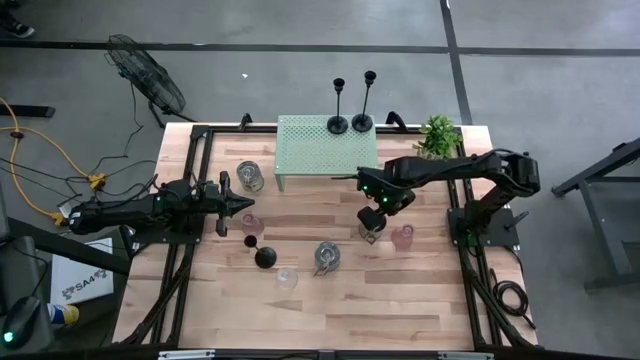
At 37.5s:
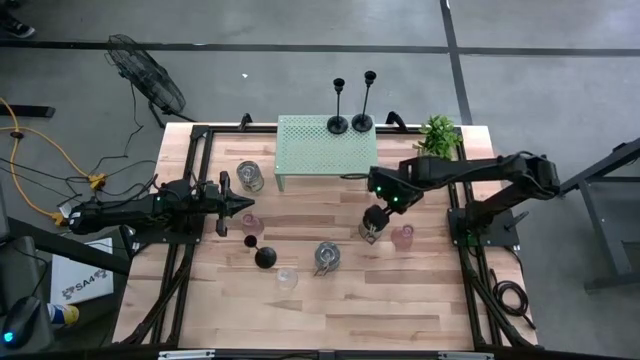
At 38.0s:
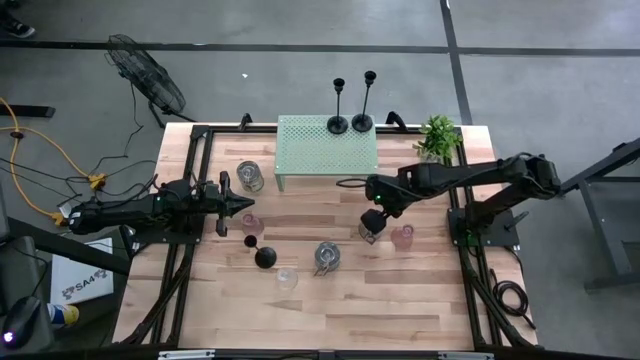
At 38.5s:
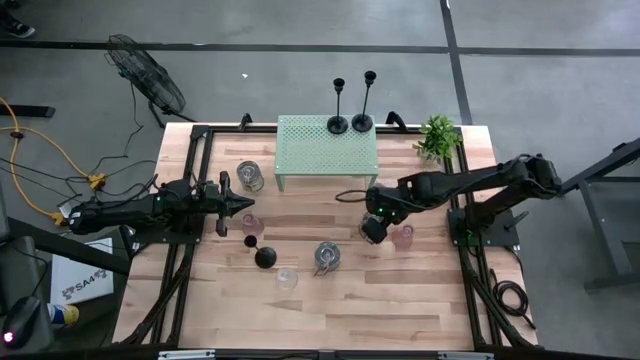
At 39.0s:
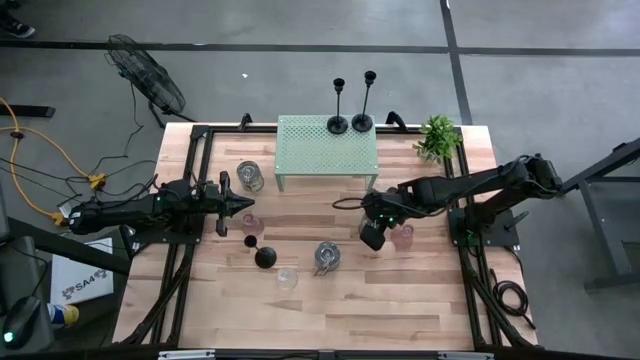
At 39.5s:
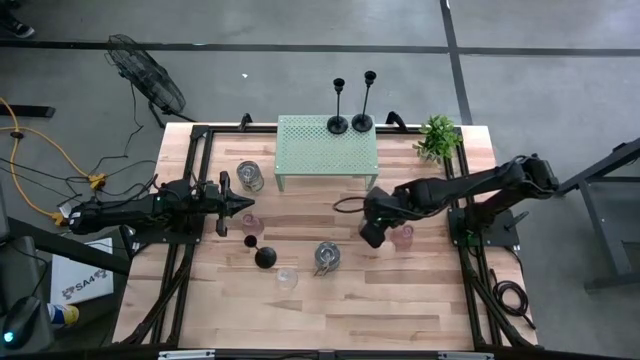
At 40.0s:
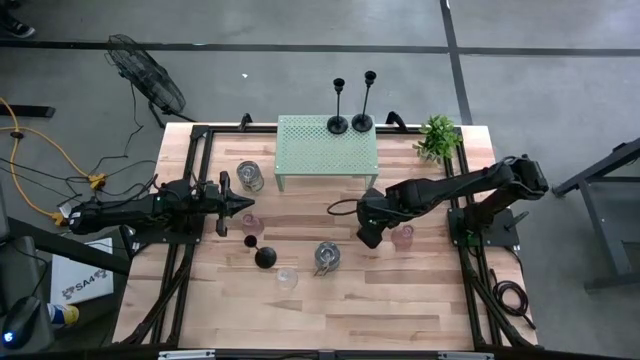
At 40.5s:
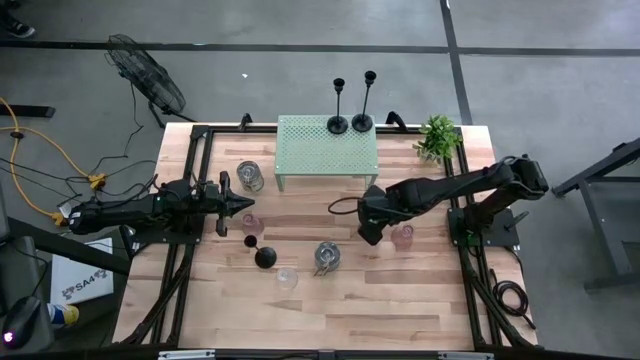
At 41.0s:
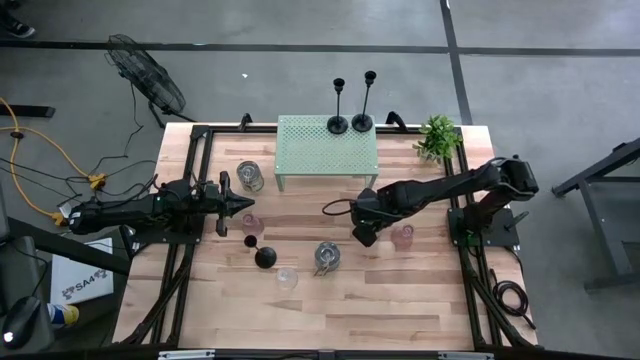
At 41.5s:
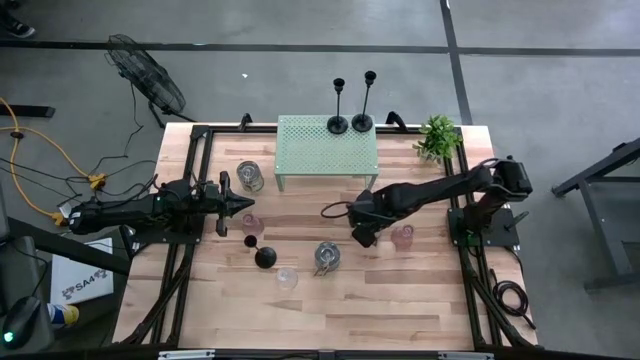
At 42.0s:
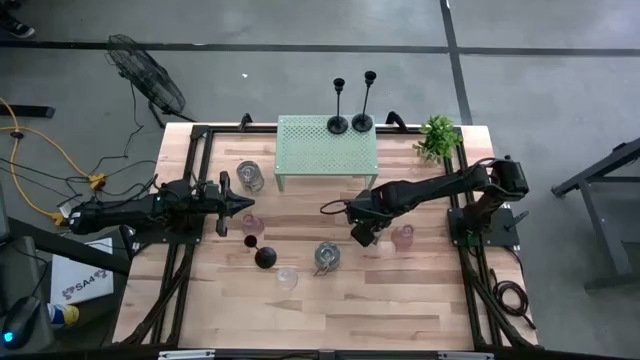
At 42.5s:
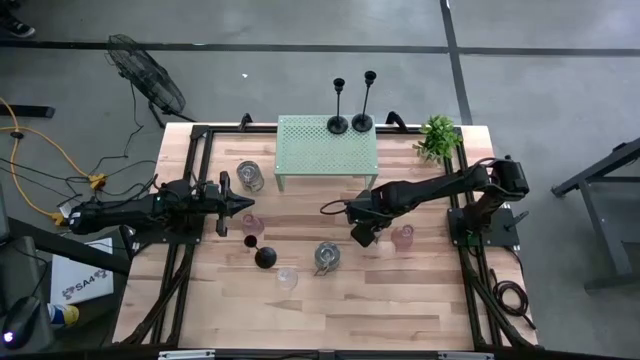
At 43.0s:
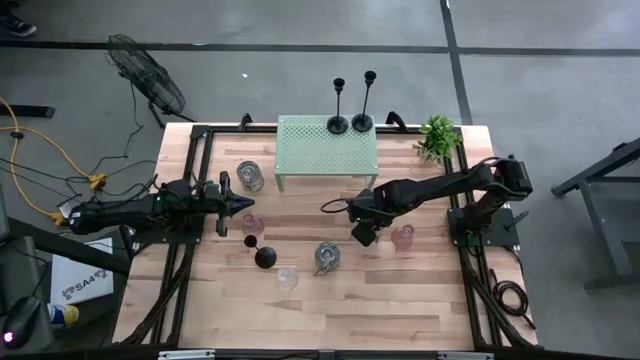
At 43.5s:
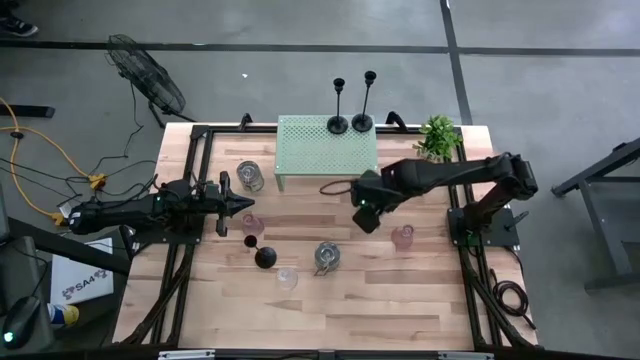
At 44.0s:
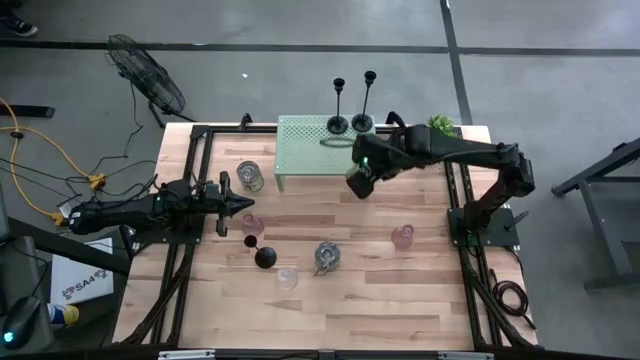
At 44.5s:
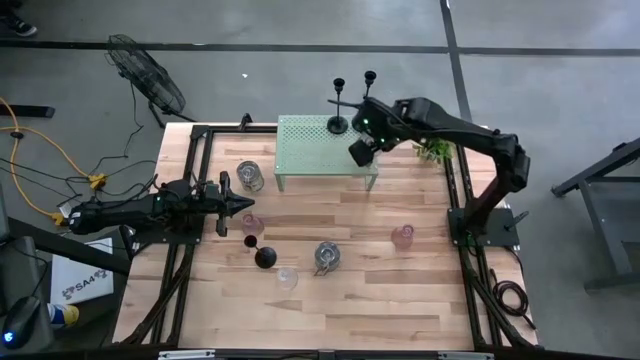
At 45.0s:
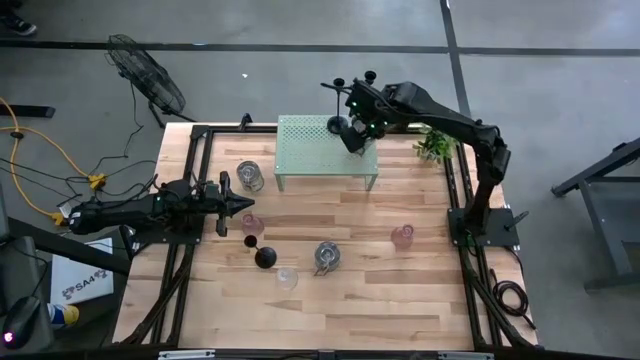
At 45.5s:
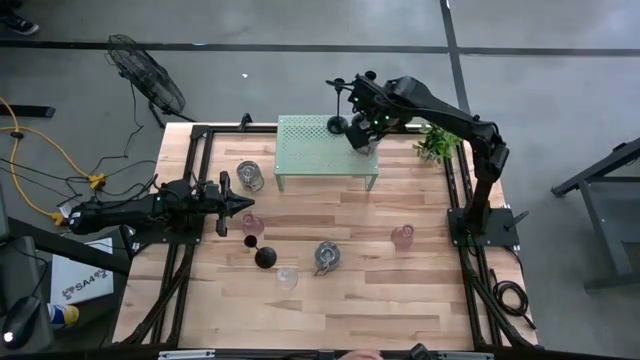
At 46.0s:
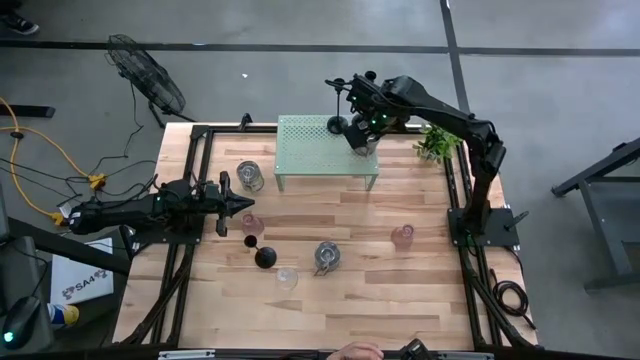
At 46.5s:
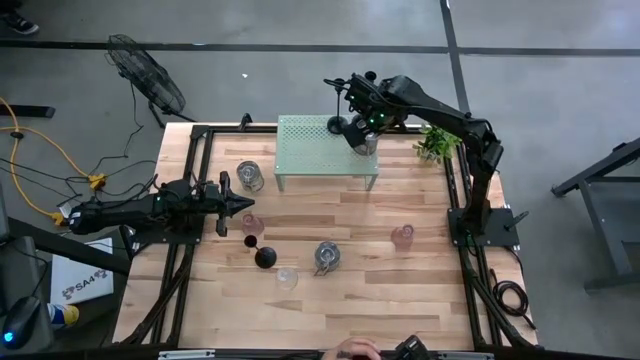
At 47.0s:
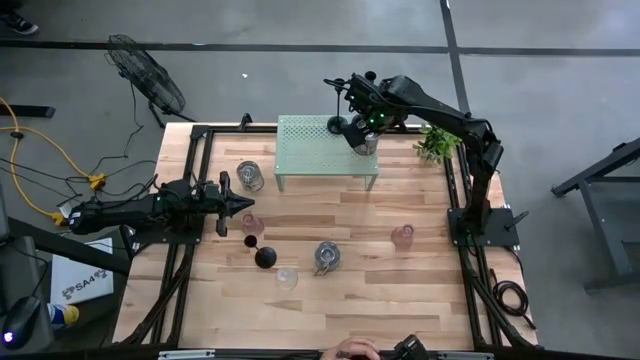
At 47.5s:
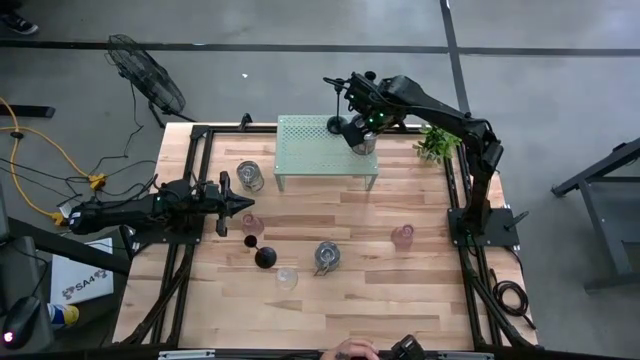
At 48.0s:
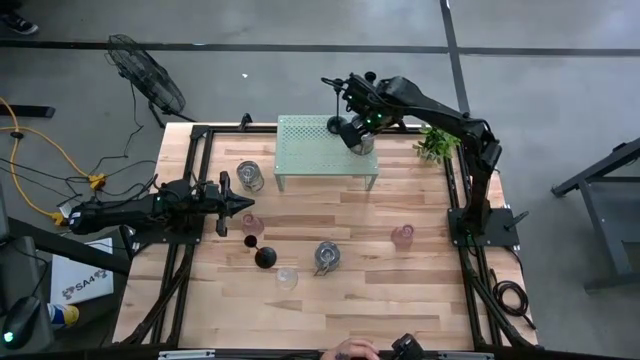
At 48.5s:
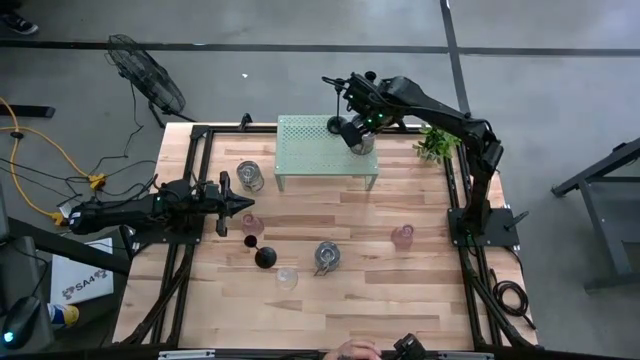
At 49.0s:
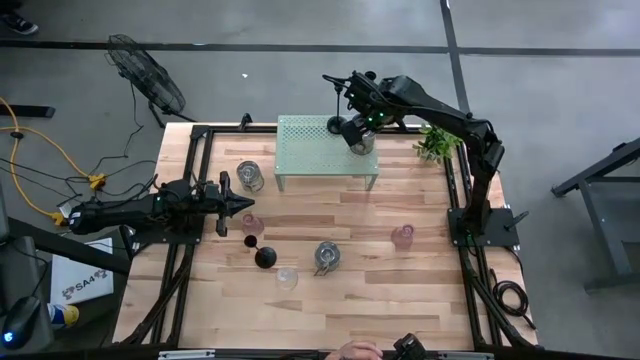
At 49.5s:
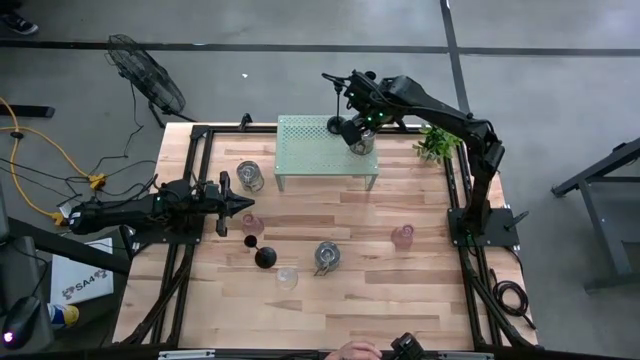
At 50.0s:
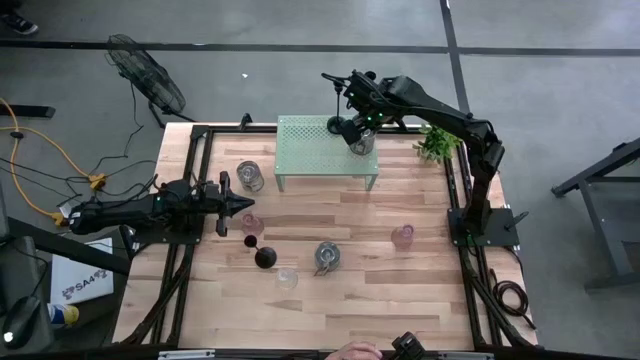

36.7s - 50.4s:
Task: Pick & Place candle stick holders
Put the bottom silver scented candle on the shelf

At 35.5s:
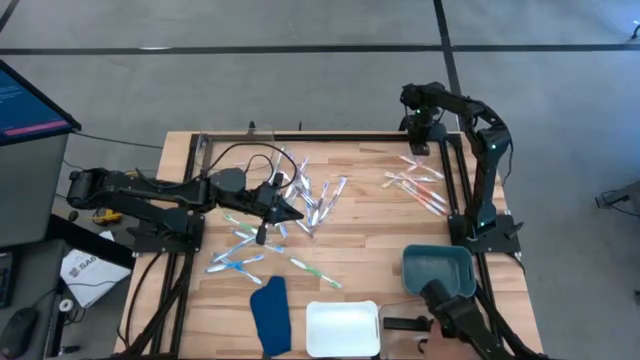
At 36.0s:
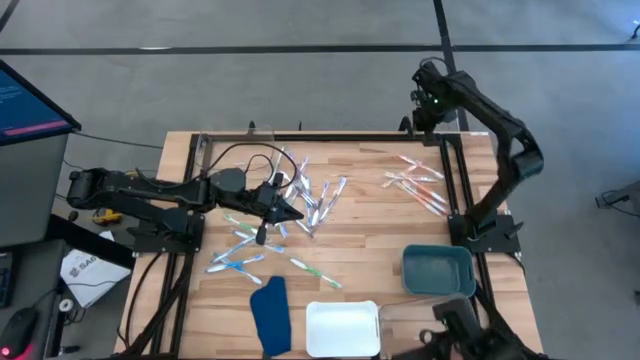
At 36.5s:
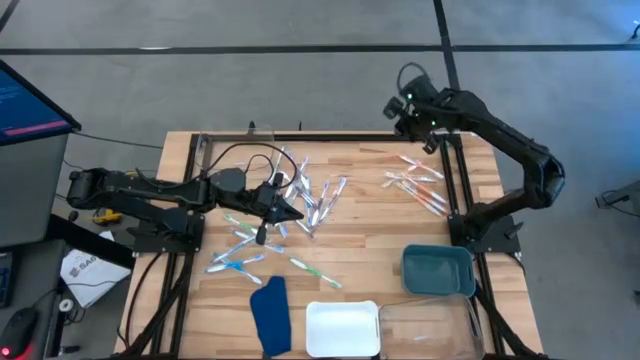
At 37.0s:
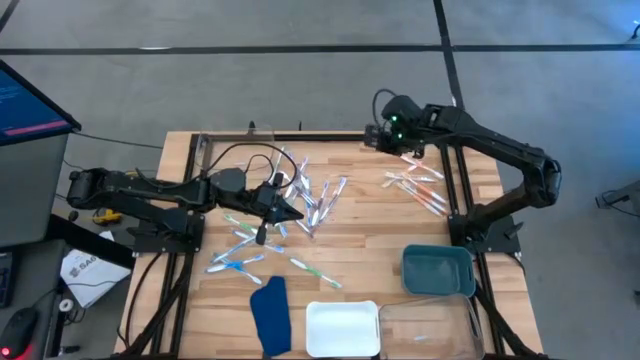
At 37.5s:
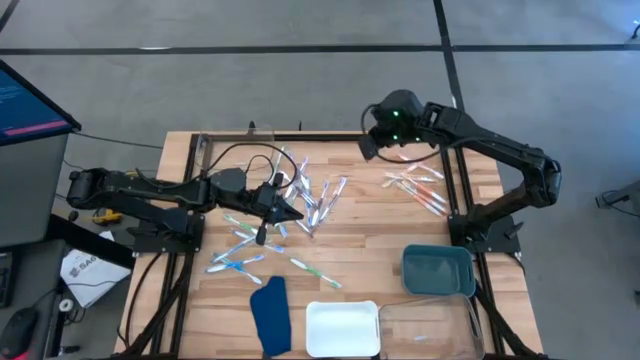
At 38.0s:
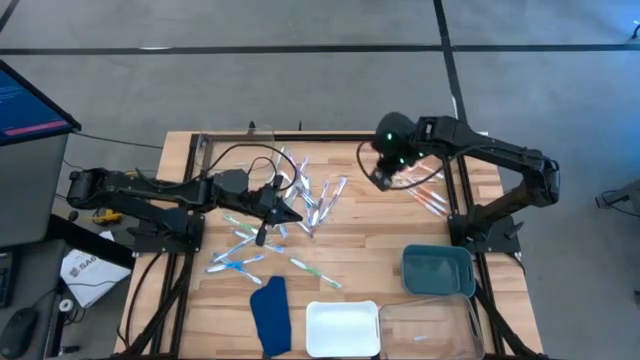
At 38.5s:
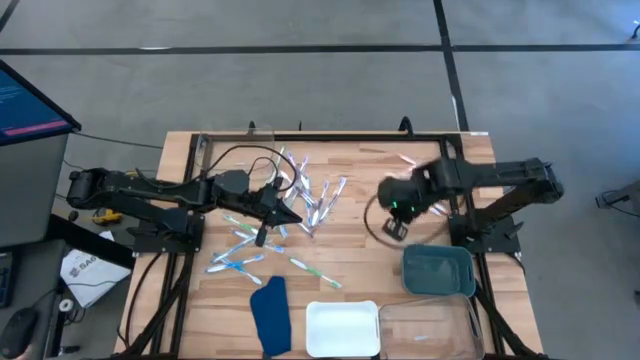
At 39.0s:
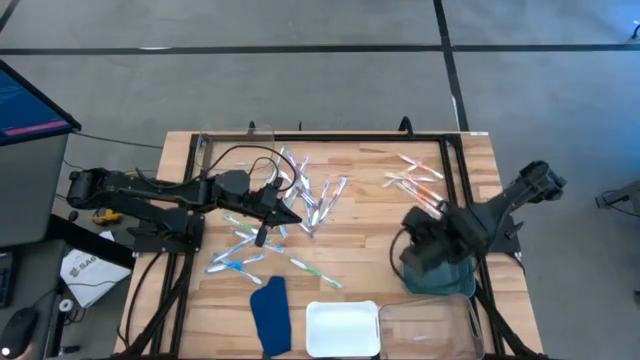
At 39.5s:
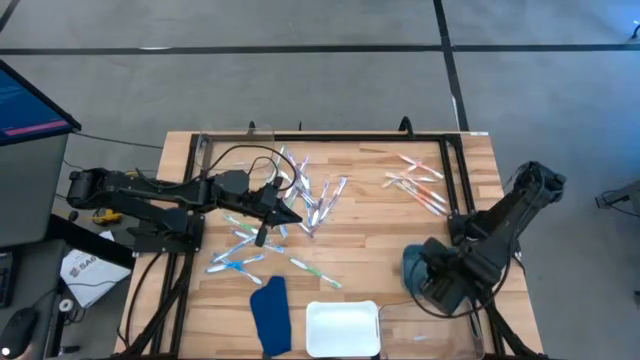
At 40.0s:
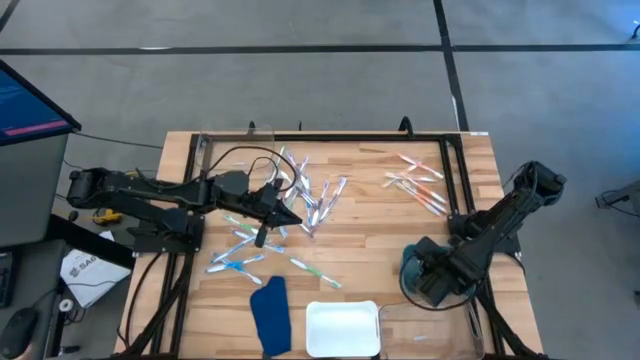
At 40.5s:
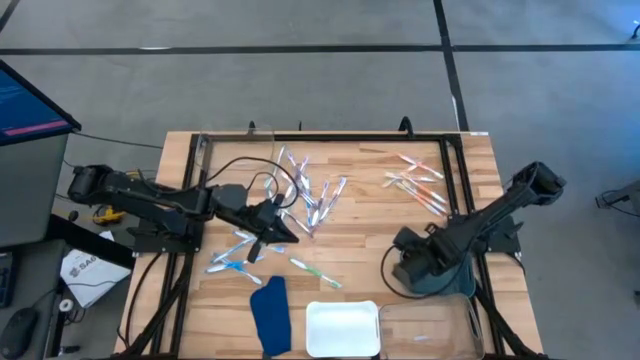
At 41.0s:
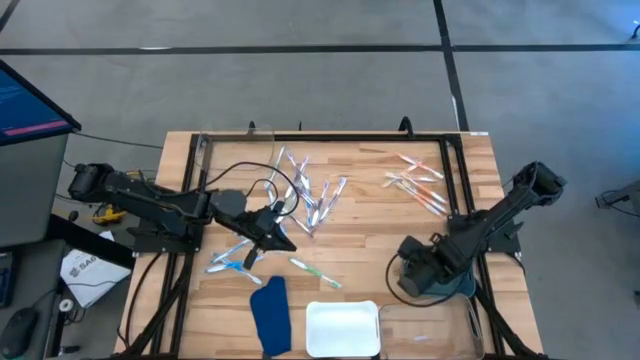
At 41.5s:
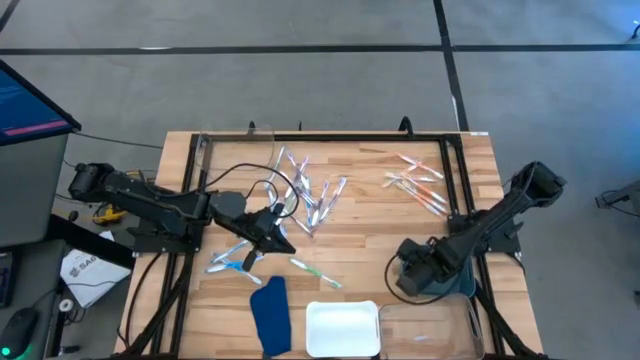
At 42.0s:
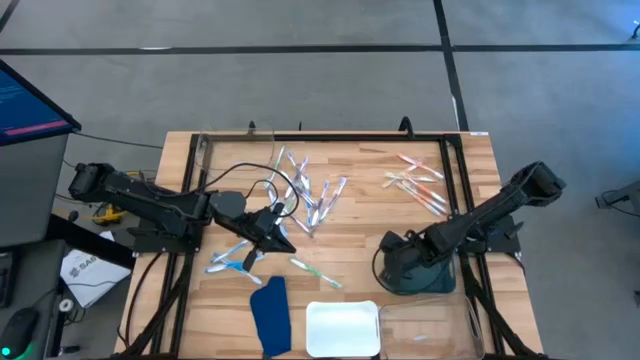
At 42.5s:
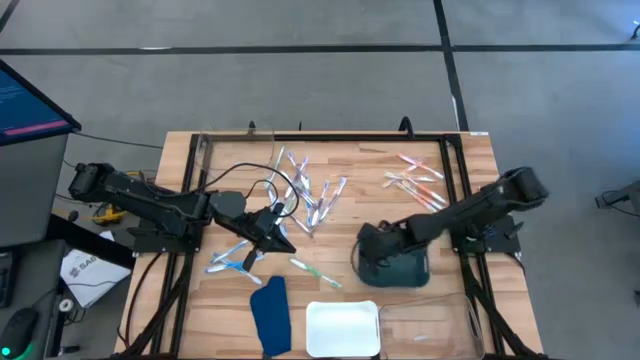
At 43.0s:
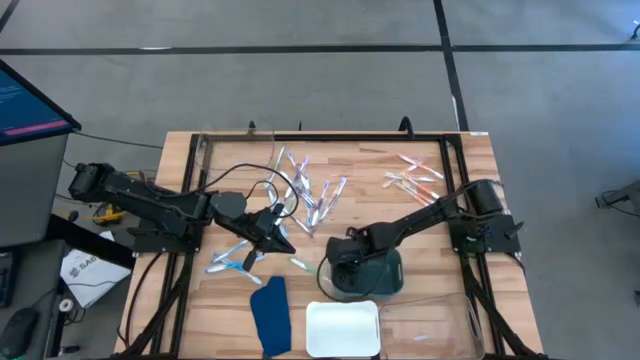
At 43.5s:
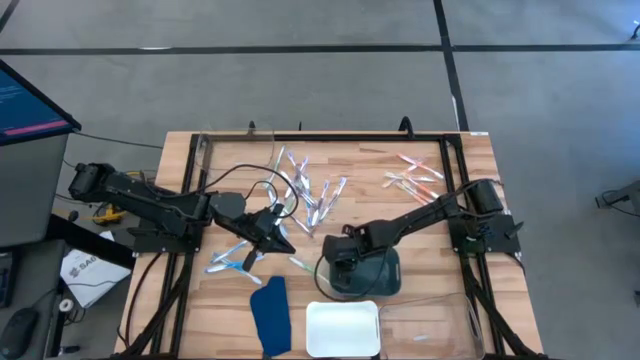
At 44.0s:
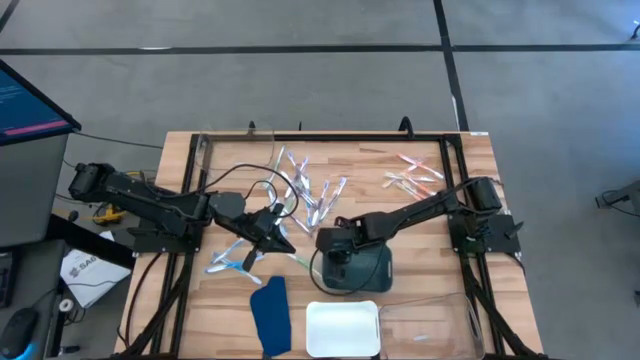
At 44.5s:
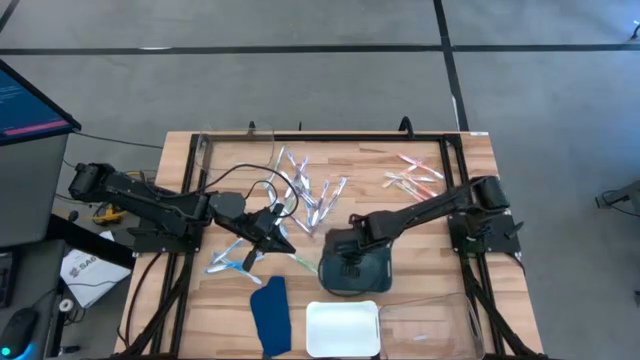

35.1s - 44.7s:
Task: Pick & Place Toothbrushes
Move the green bin to the center of the table
